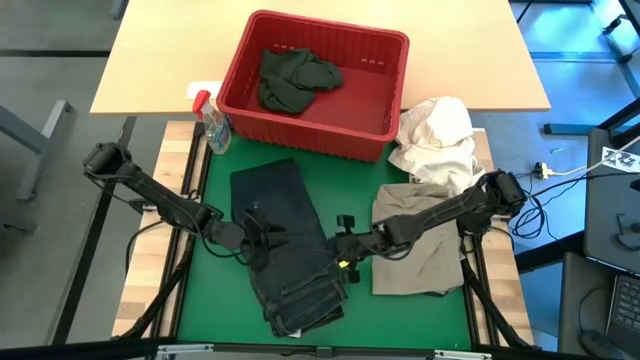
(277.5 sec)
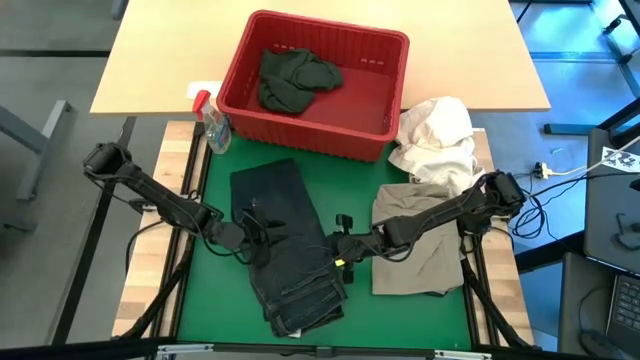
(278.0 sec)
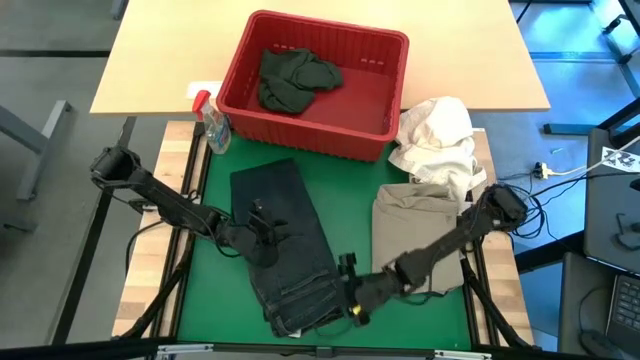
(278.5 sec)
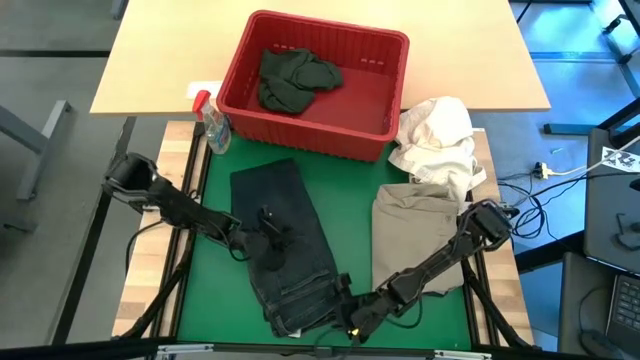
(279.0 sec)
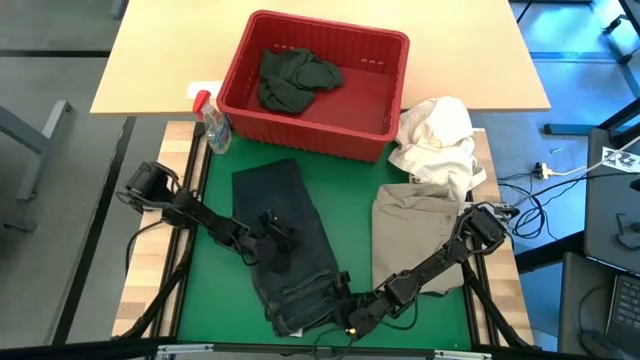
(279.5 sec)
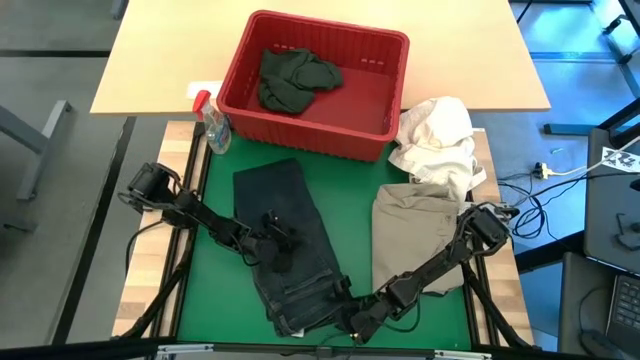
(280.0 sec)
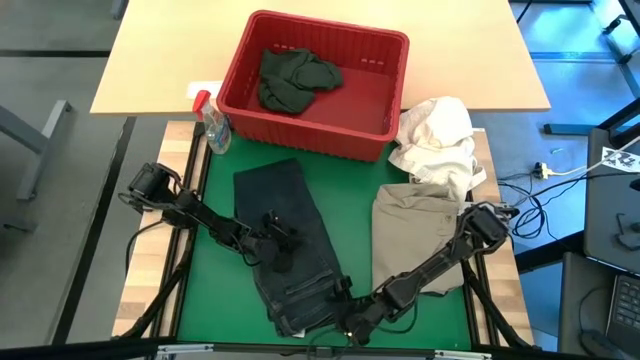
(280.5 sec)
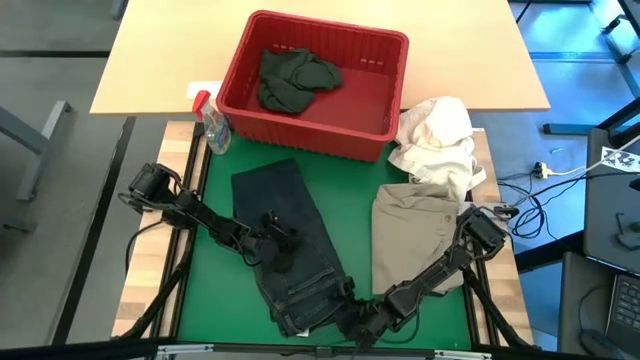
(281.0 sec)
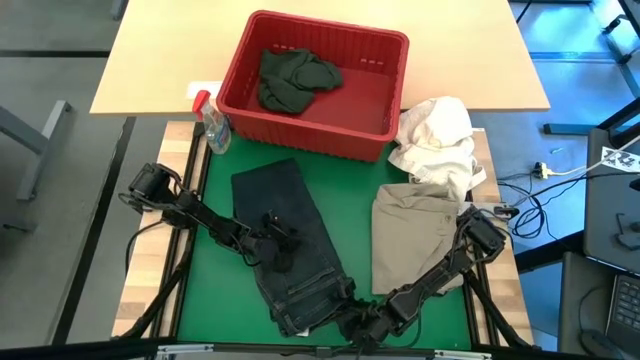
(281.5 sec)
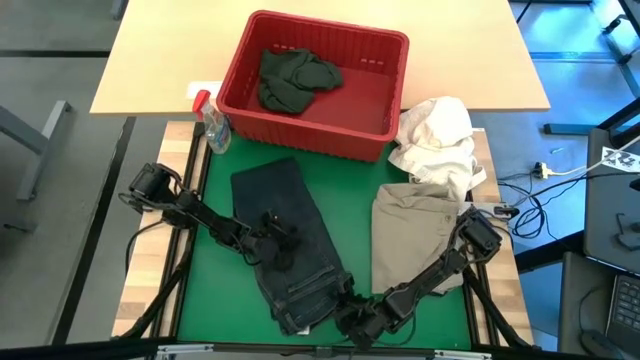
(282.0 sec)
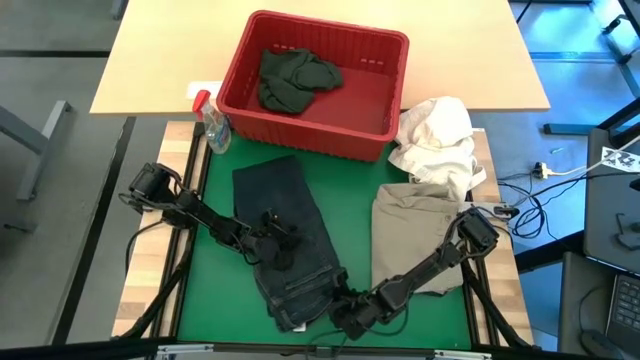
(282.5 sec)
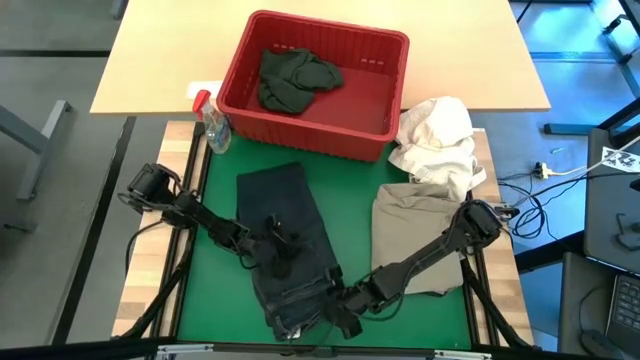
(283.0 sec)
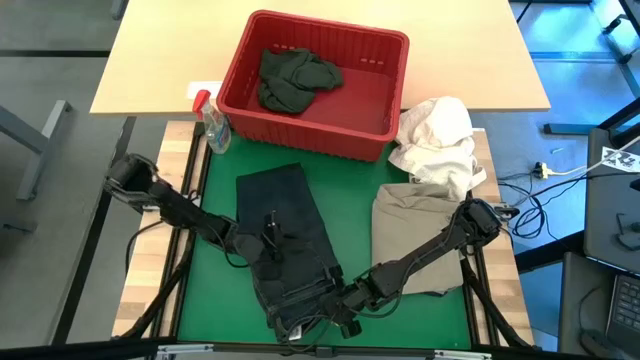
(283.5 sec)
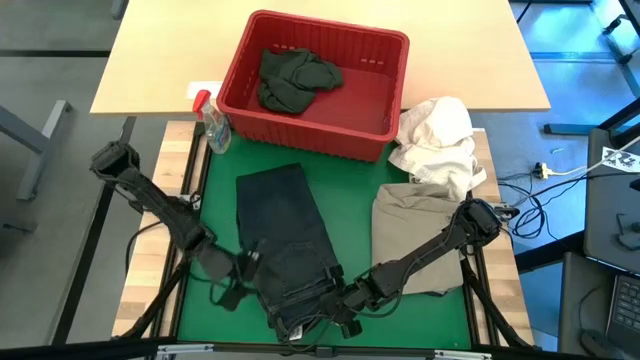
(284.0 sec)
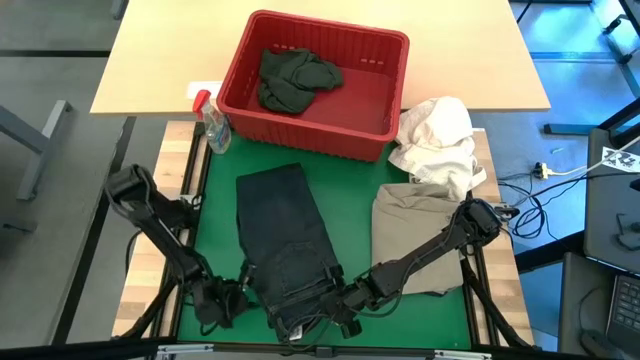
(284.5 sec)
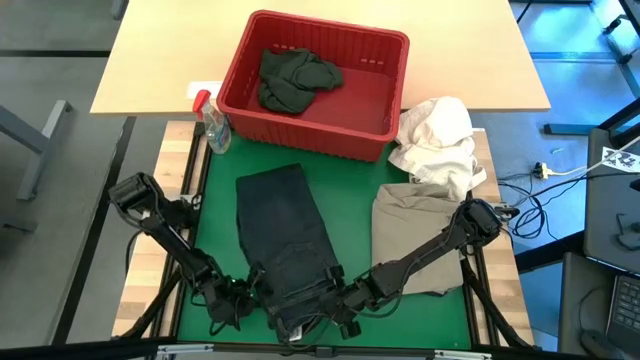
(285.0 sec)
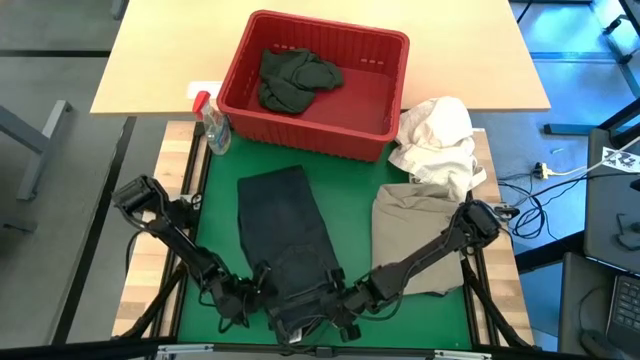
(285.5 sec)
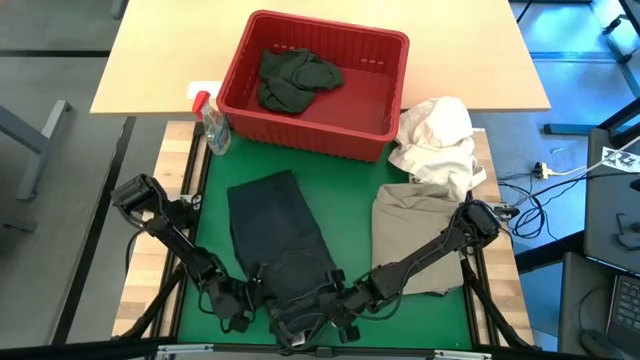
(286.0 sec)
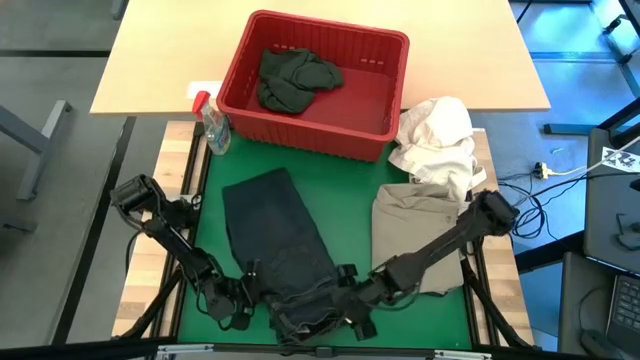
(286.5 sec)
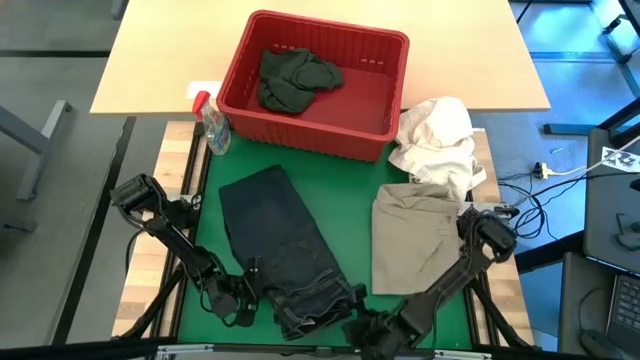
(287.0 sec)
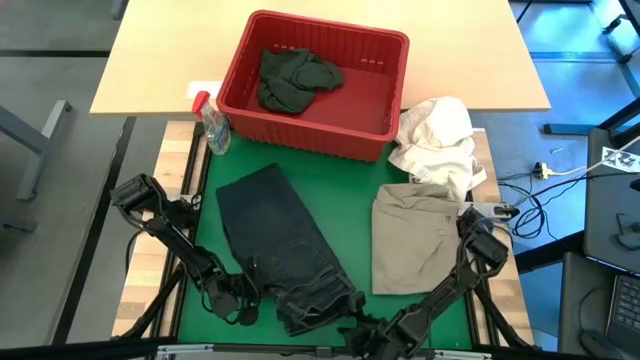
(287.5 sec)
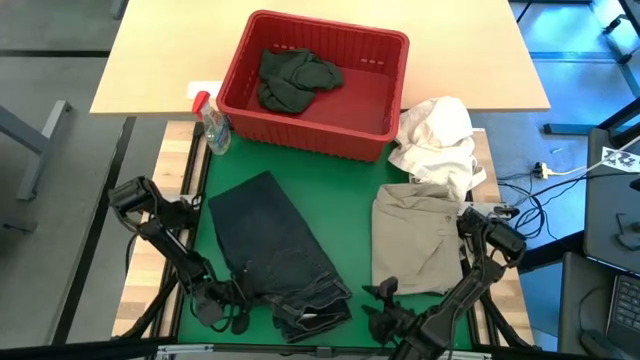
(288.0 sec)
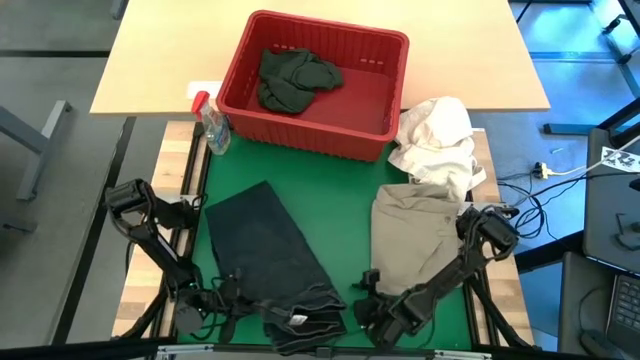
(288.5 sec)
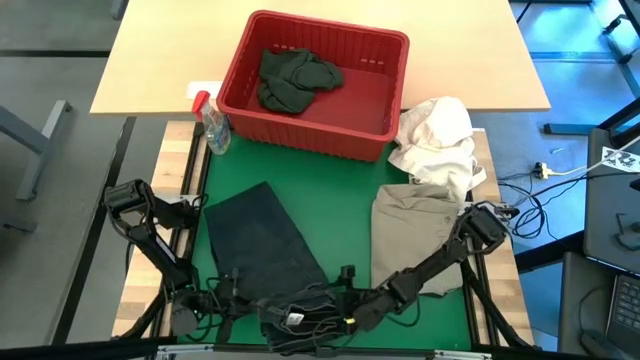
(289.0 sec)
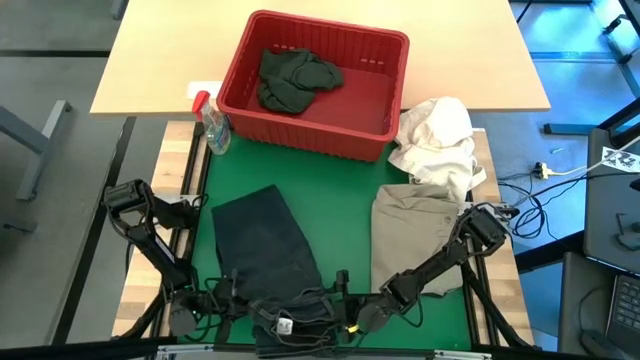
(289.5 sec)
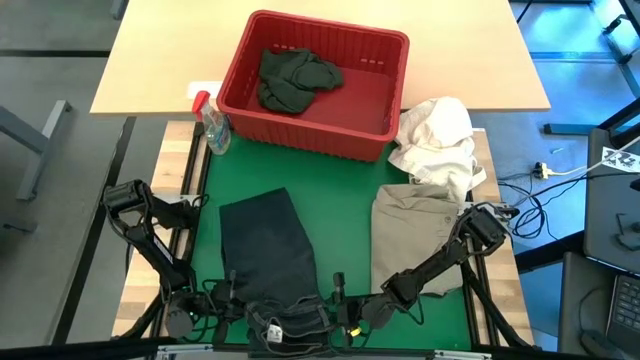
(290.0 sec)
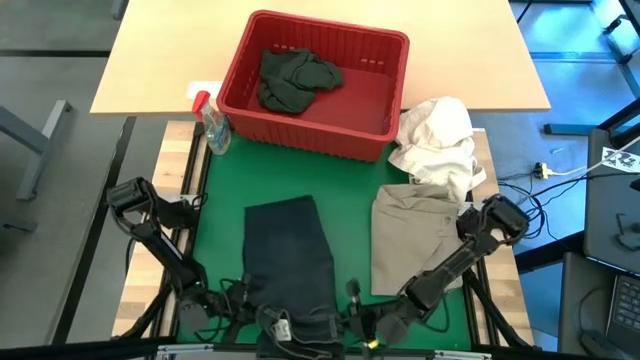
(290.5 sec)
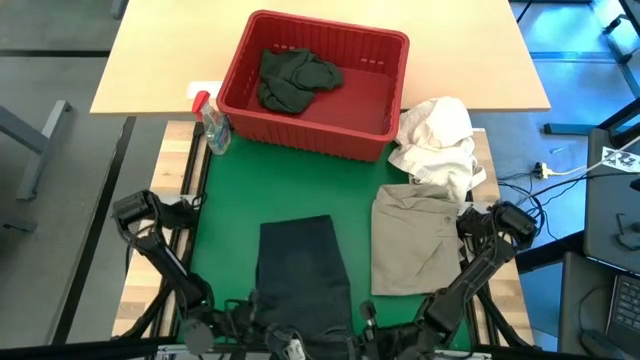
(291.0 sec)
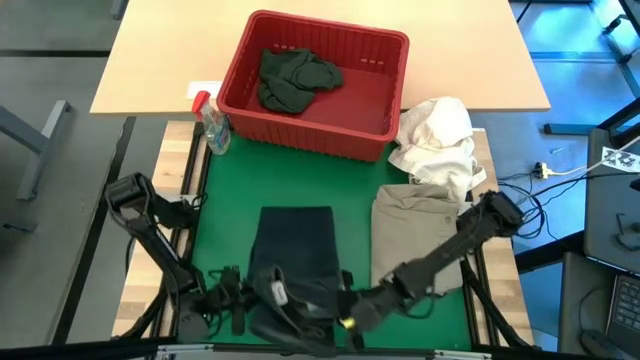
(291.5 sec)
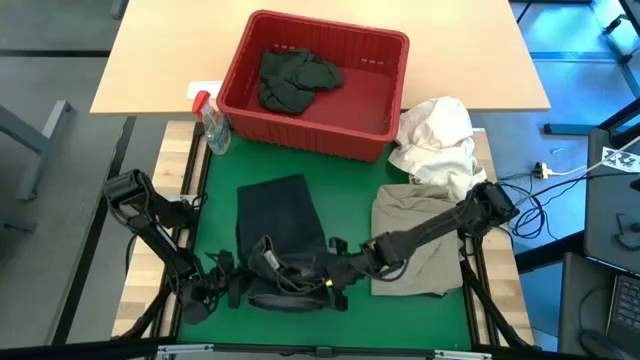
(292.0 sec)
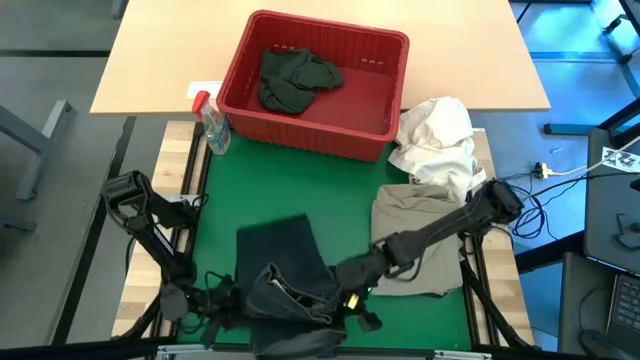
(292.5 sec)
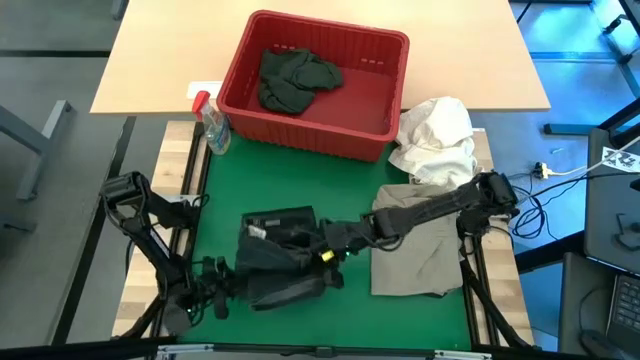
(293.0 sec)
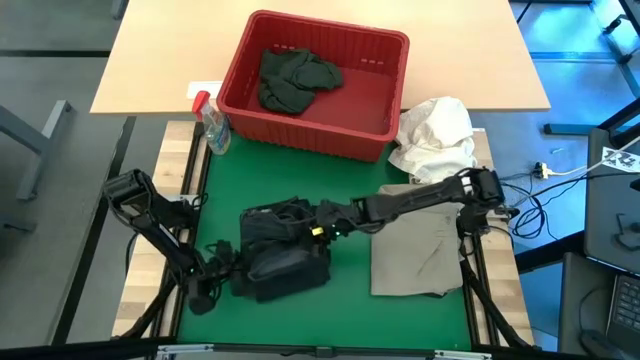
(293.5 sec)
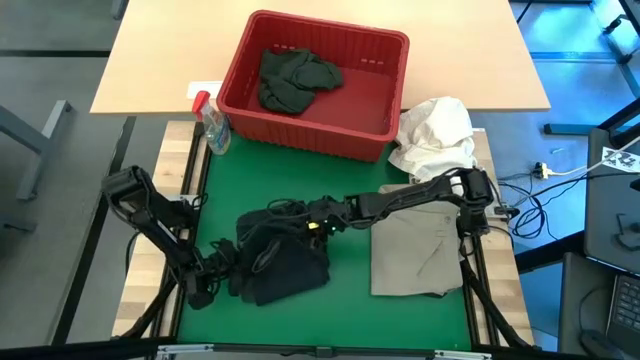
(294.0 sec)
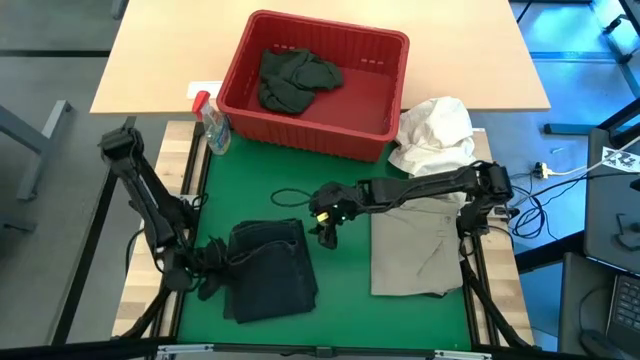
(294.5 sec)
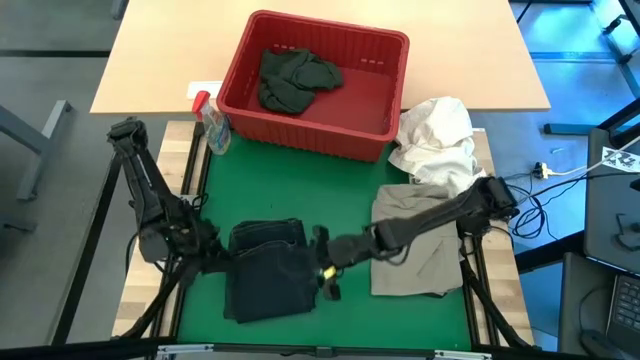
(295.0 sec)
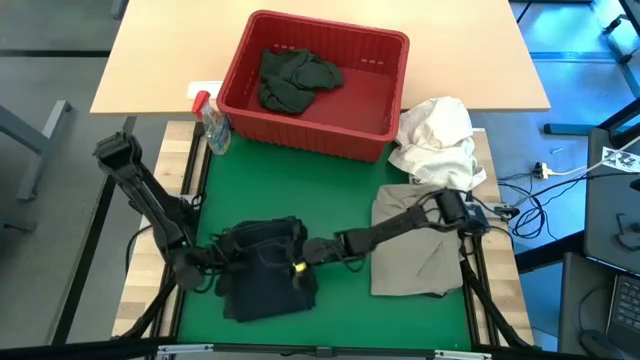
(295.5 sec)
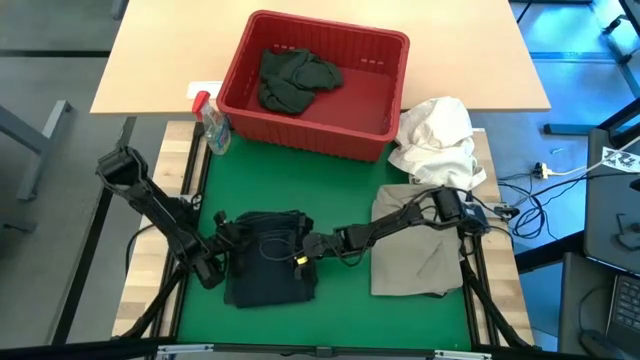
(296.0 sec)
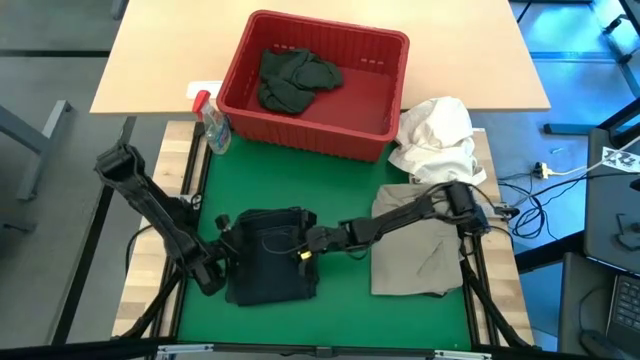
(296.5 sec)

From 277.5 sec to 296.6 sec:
Task: Fold Laundry from Bin
Fold the blue pants
